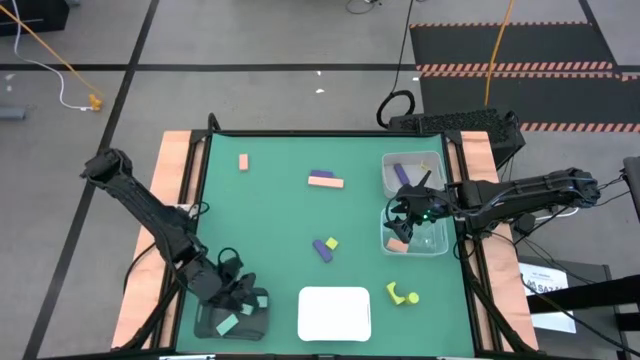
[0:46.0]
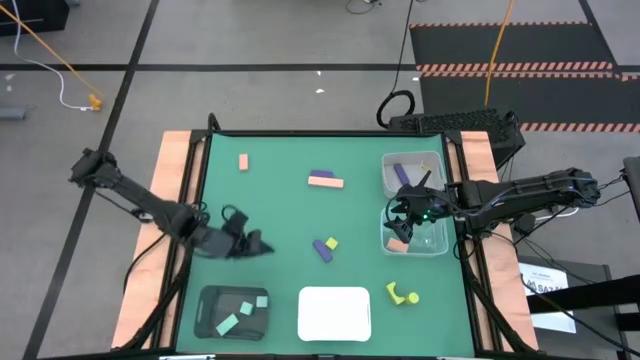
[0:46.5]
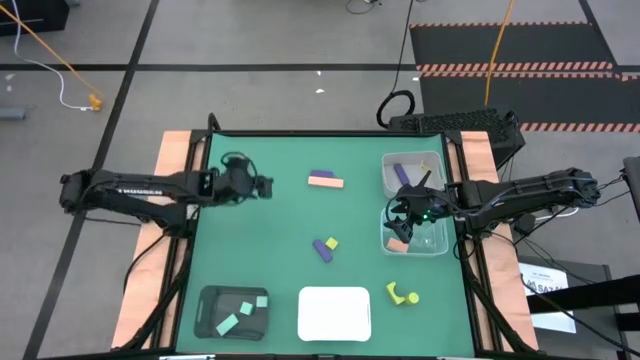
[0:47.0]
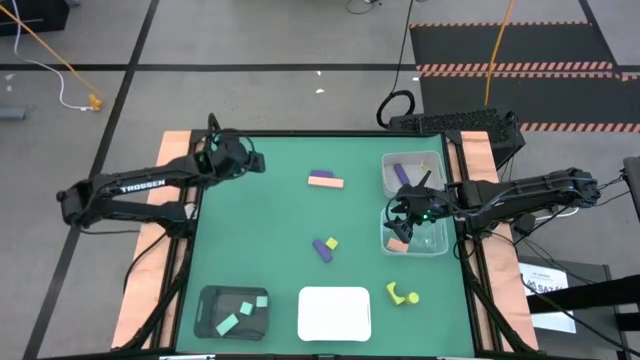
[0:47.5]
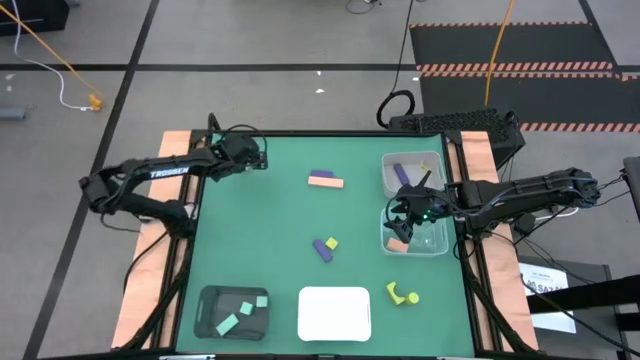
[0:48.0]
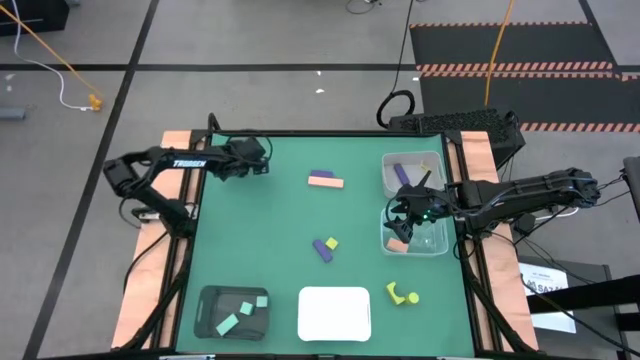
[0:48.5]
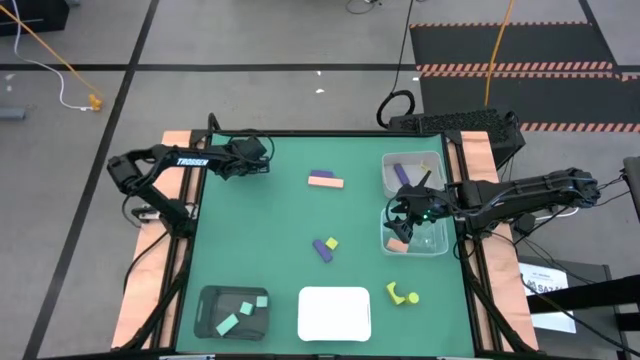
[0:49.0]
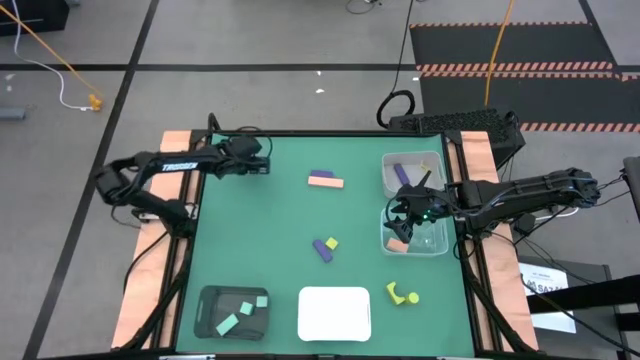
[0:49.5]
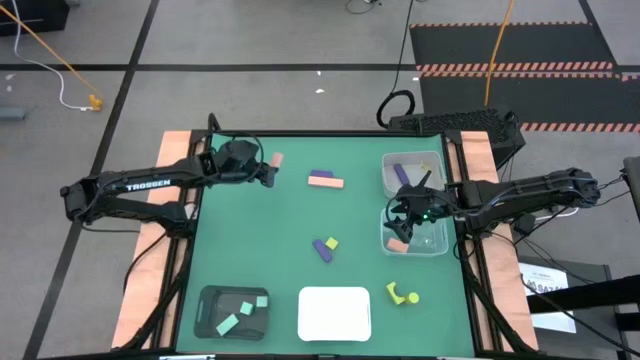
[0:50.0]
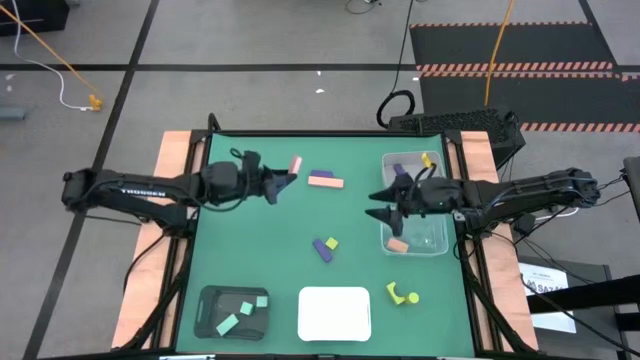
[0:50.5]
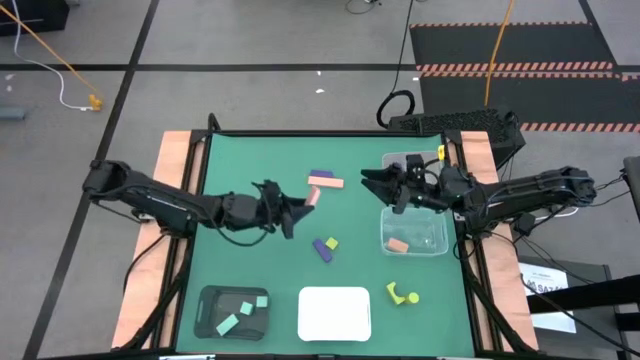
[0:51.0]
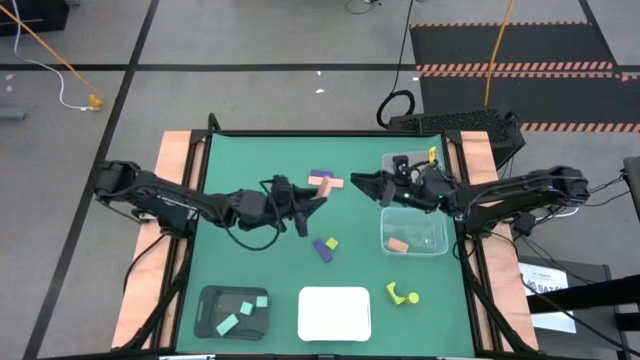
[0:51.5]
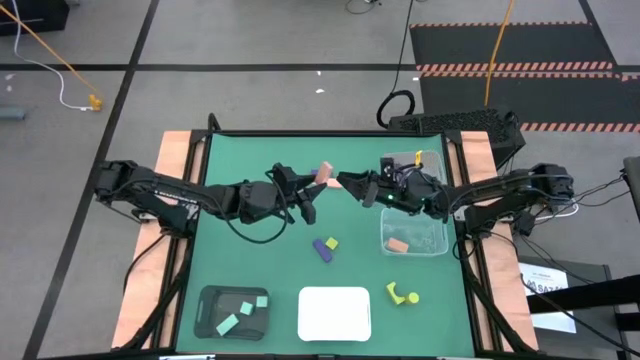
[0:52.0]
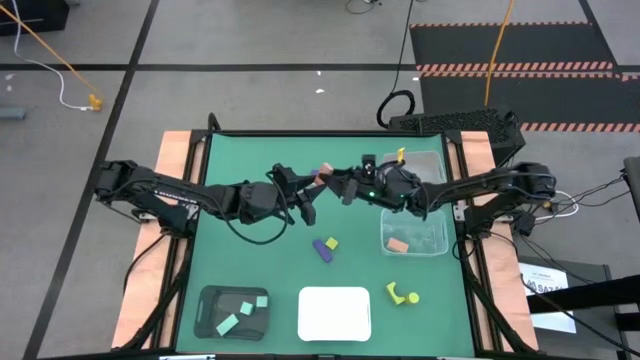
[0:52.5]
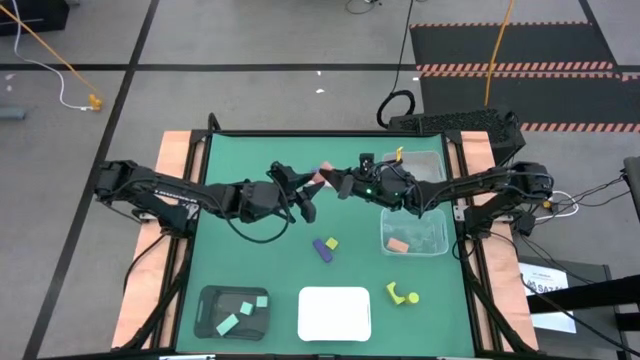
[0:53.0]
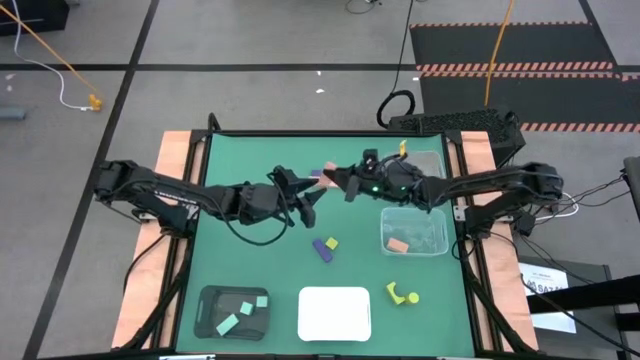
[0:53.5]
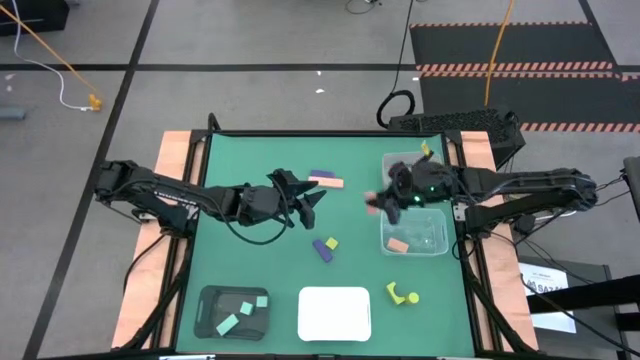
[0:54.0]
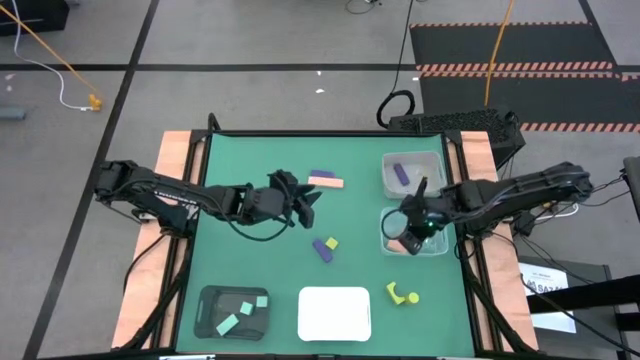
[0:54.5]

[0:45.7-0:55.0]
Task: Sort & place blocks by color
Put the top light orange block into the transparent bin

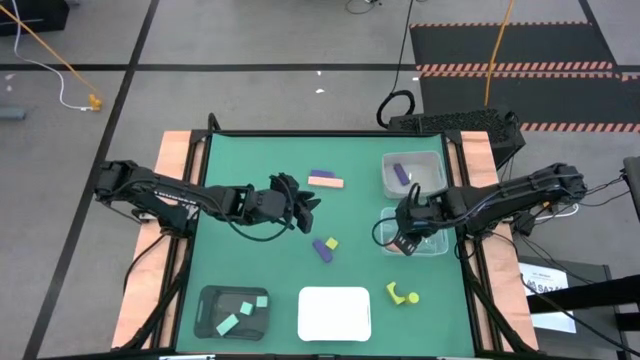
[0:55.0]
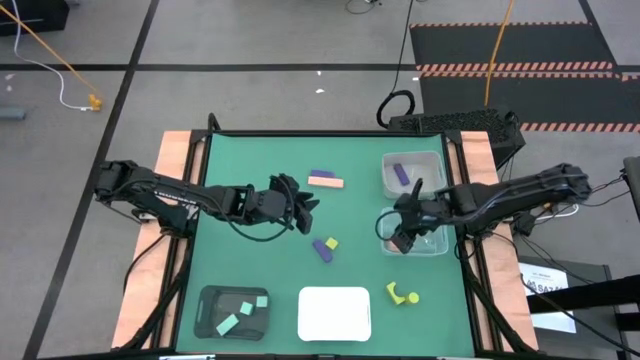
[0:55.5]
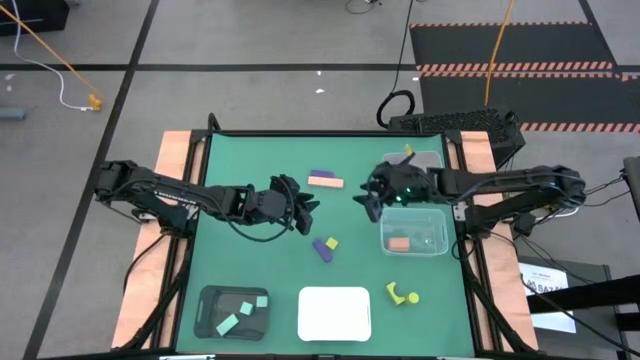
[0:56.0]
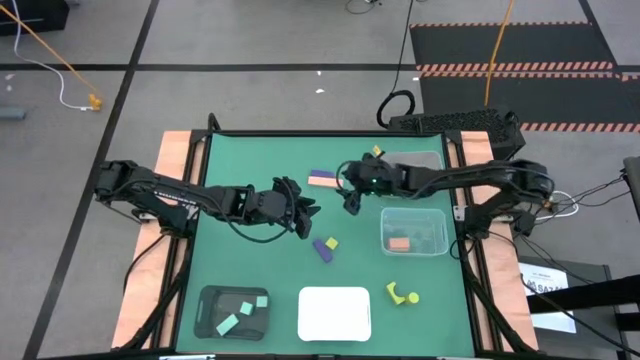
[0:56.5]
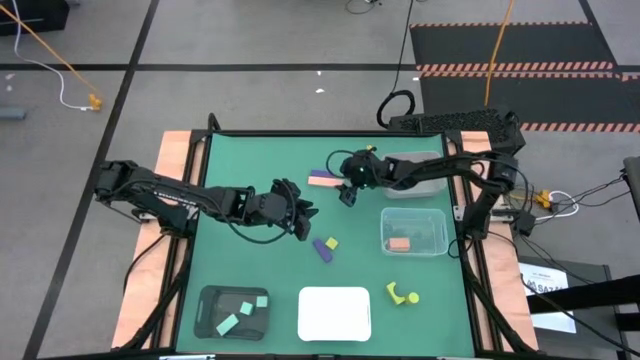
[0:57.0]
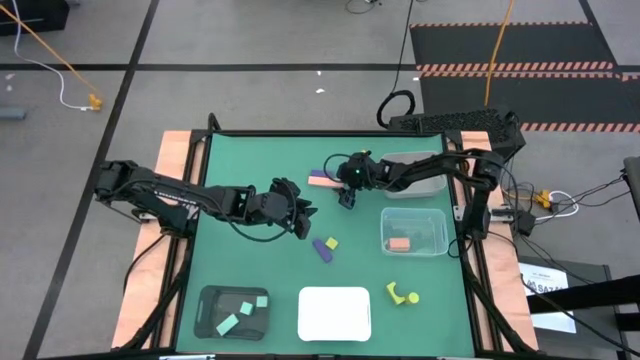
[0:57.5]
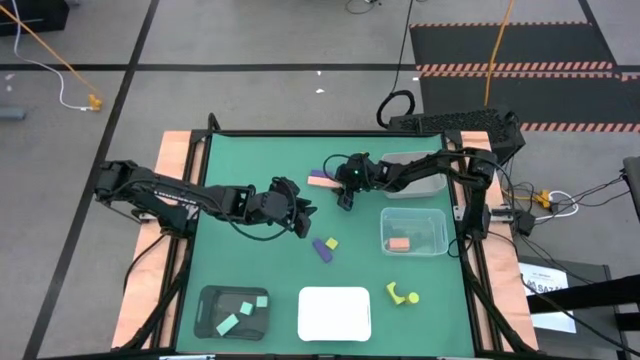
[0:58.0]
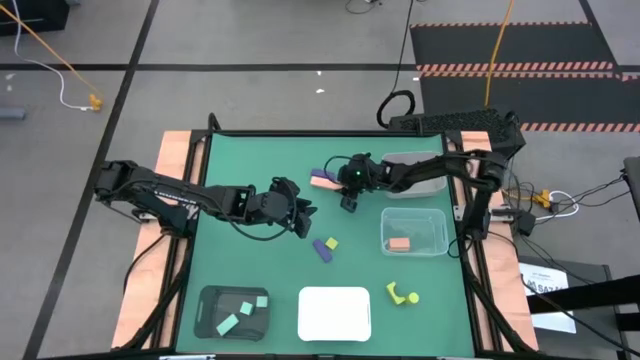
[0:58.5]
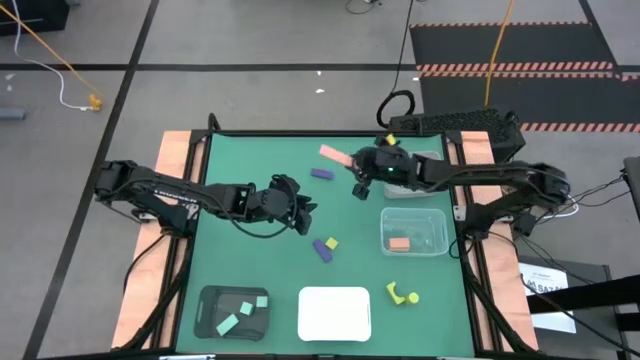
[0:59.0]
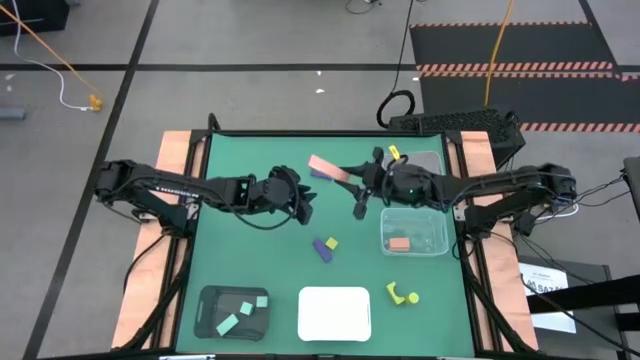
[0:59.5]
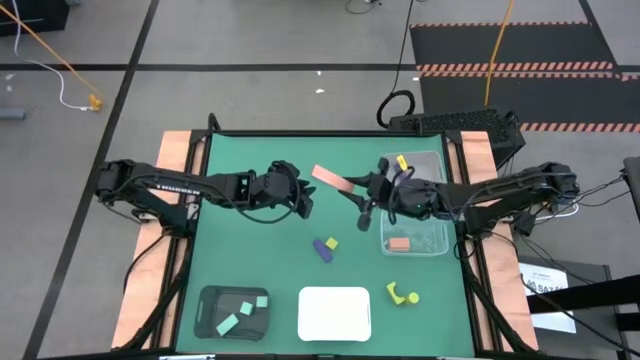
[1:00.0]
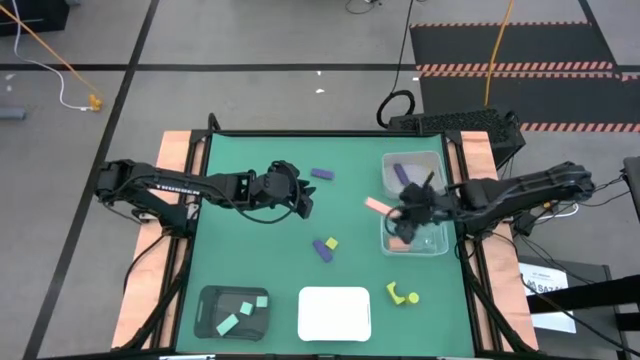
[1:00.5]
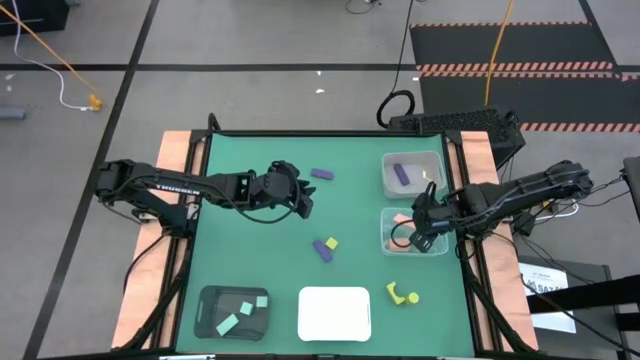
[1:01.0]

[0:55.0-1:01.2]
Put the light orange block into the transparent bin

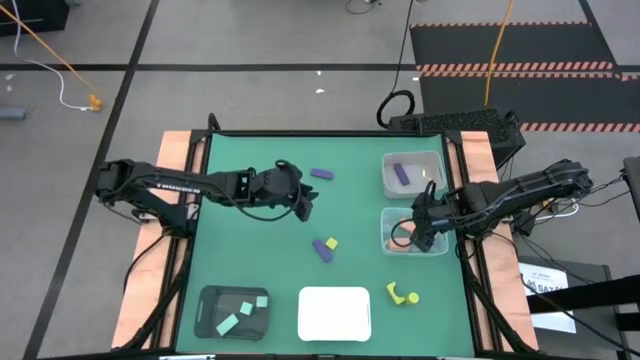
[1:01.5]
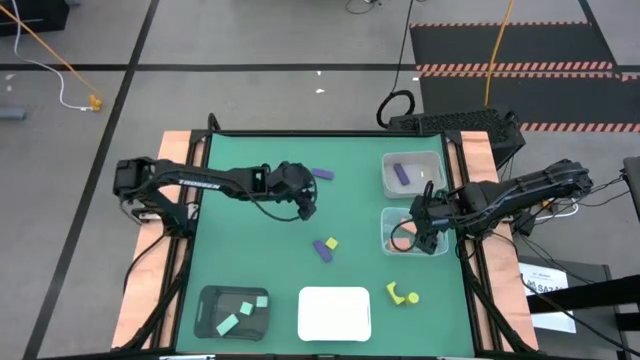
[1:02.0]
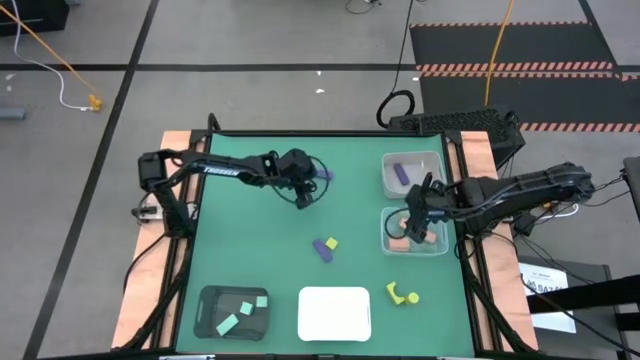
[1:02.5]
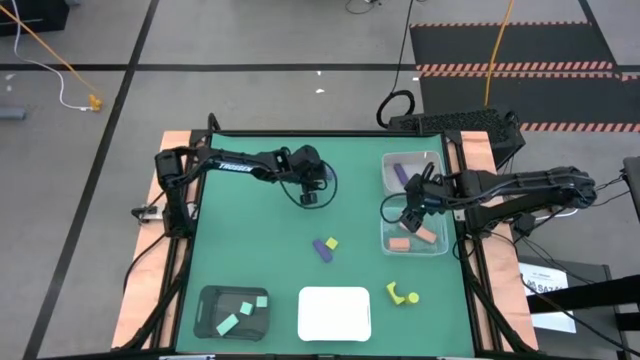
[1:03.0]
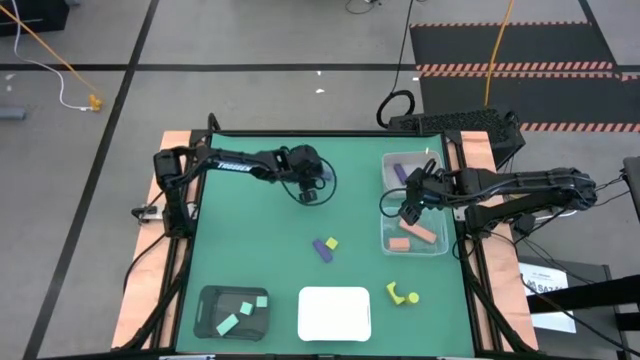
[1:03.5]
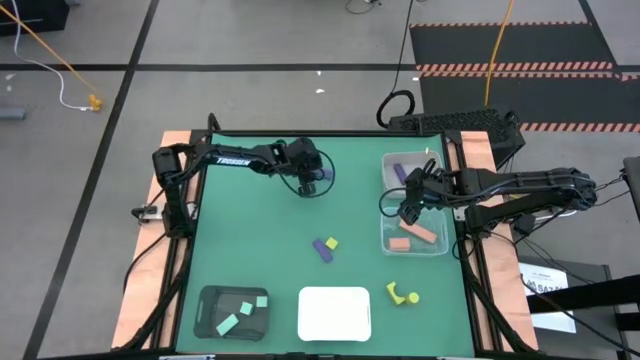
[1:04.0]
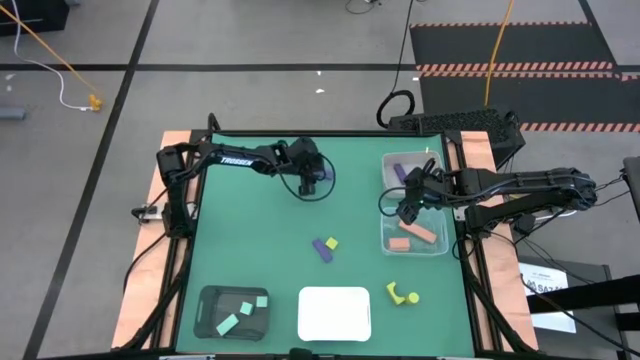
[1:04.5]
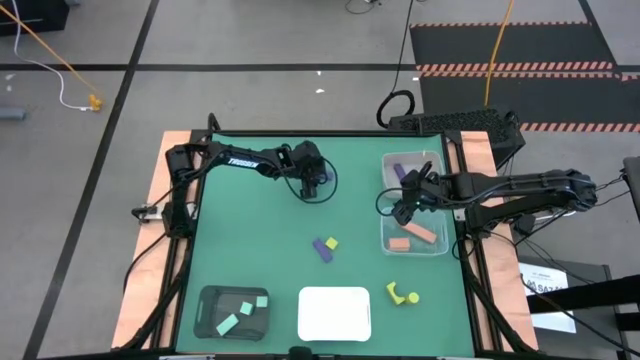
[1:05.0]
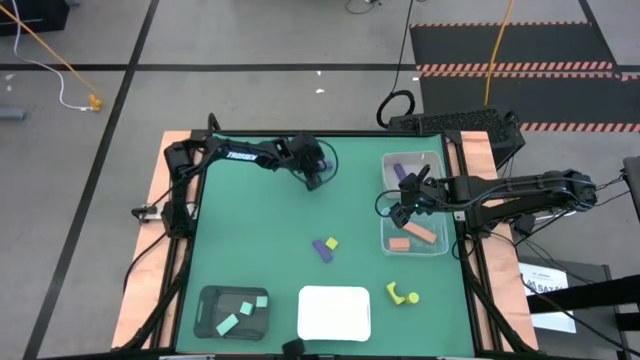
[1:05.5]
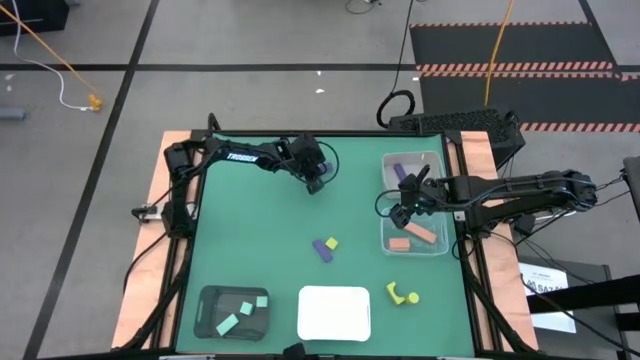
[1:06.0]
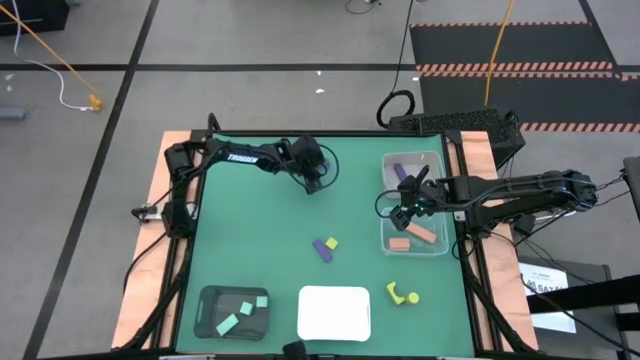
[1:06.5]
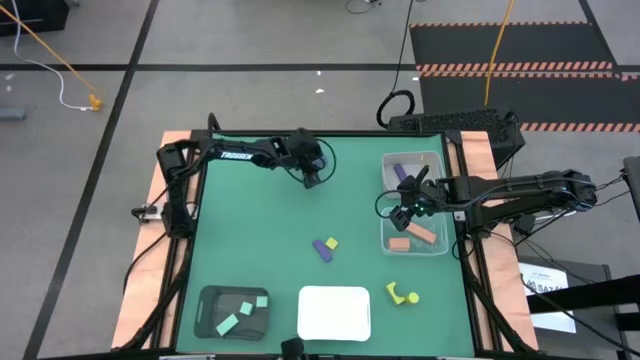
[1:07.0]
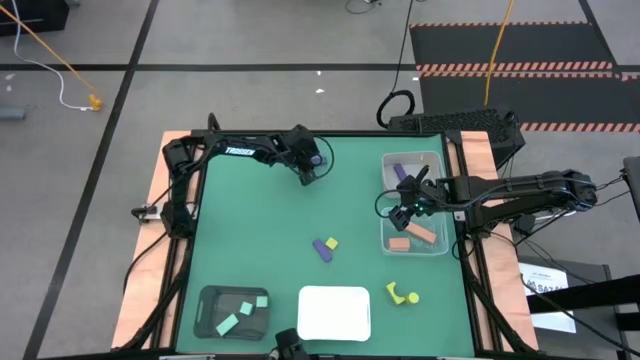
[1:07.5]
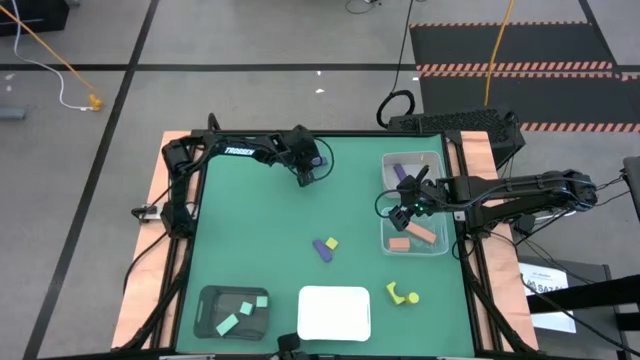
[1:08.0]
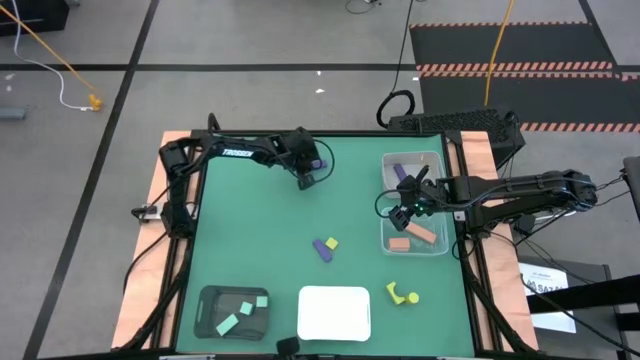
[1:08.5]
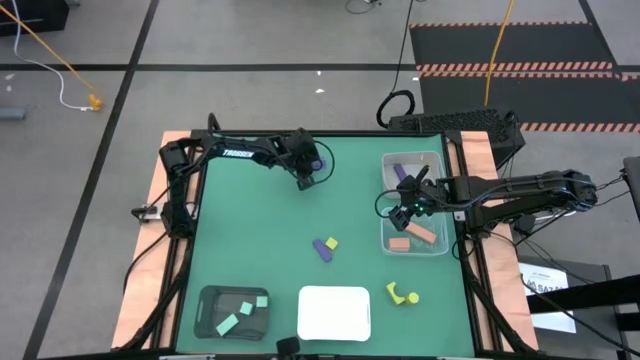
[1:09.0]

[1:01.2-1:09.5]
Put the top purple block into the gray bin
